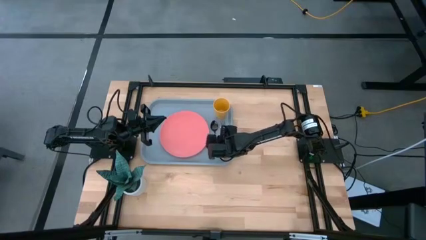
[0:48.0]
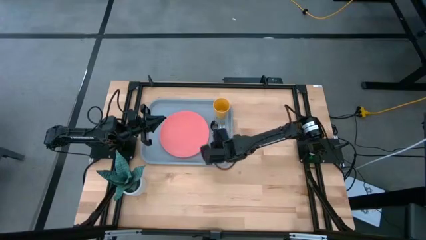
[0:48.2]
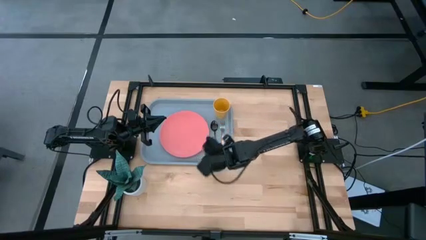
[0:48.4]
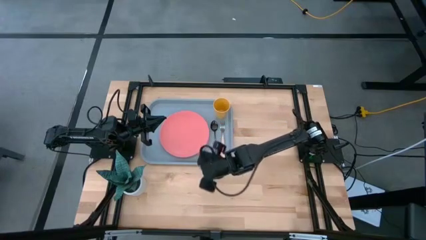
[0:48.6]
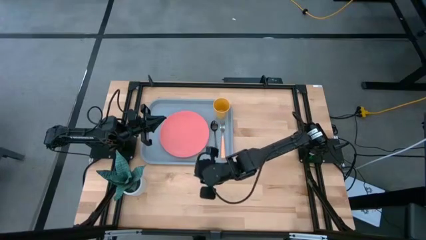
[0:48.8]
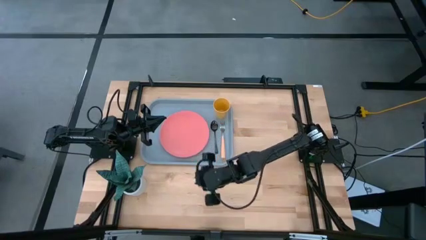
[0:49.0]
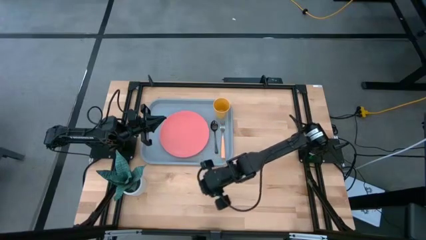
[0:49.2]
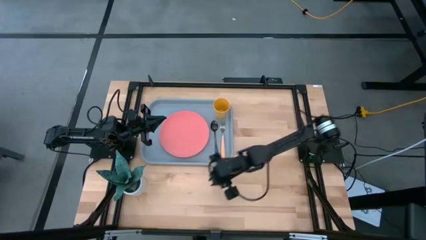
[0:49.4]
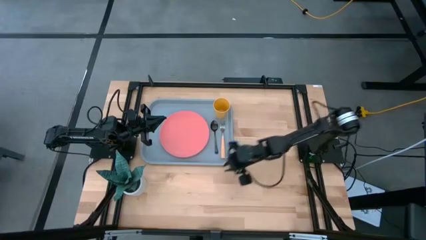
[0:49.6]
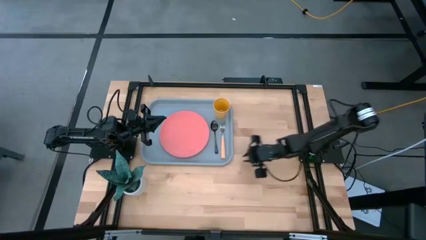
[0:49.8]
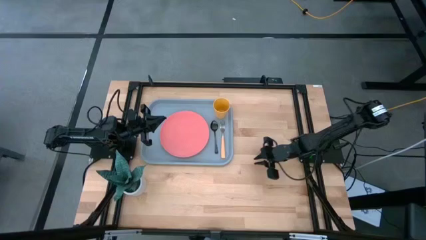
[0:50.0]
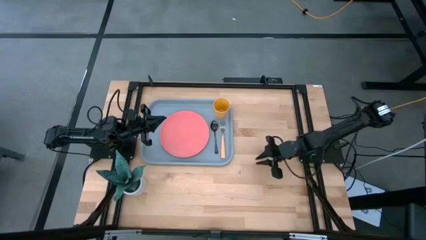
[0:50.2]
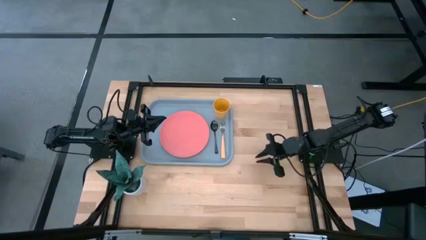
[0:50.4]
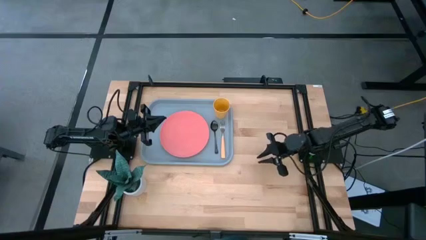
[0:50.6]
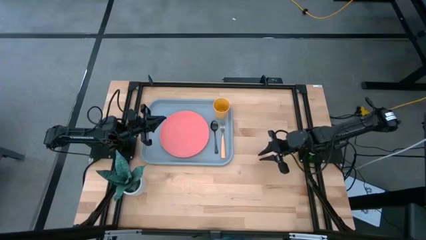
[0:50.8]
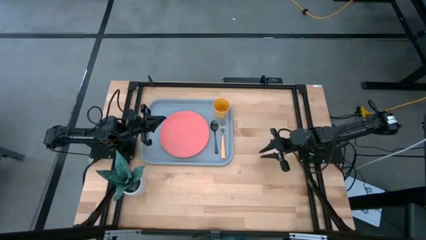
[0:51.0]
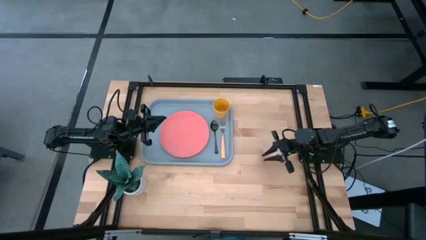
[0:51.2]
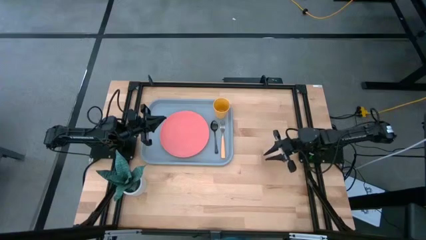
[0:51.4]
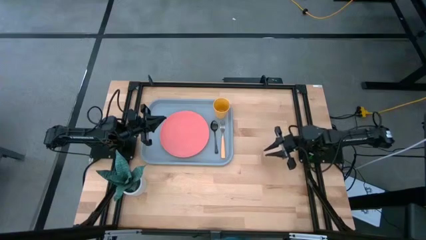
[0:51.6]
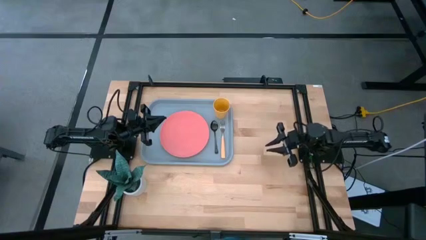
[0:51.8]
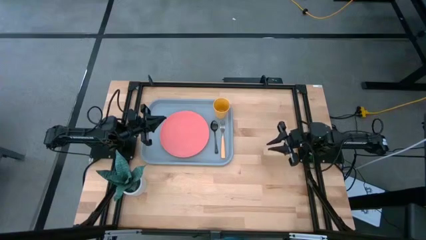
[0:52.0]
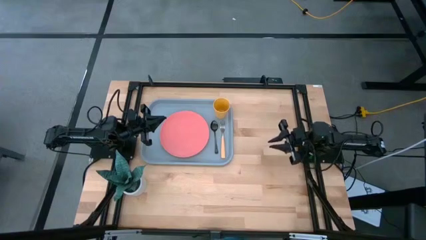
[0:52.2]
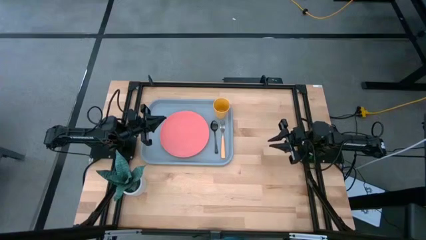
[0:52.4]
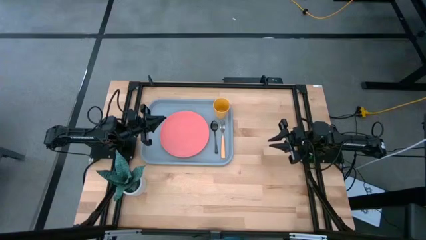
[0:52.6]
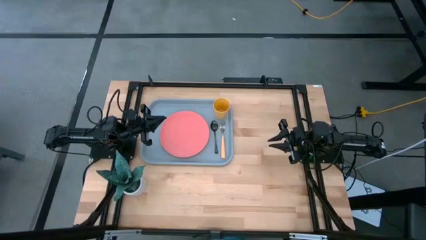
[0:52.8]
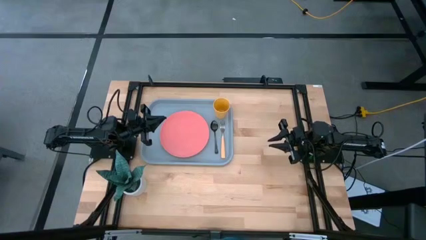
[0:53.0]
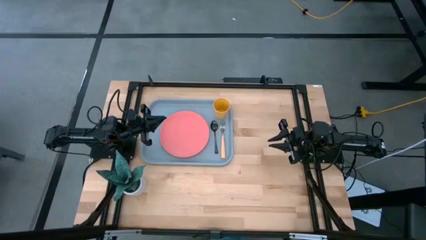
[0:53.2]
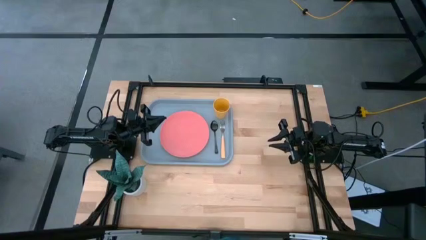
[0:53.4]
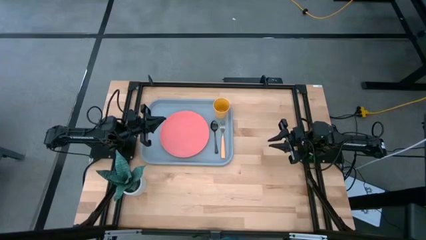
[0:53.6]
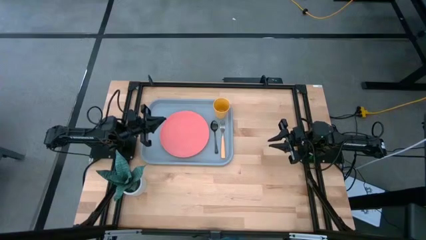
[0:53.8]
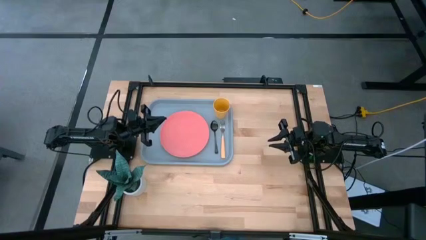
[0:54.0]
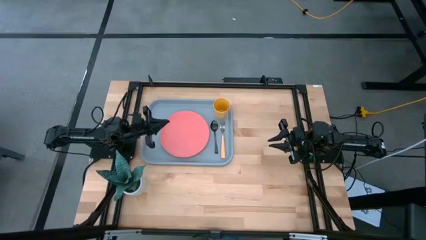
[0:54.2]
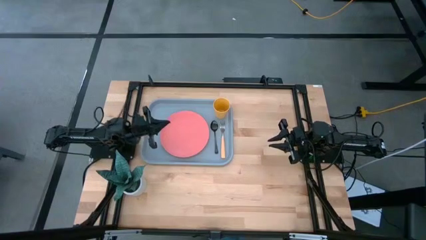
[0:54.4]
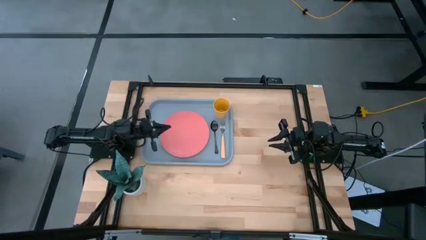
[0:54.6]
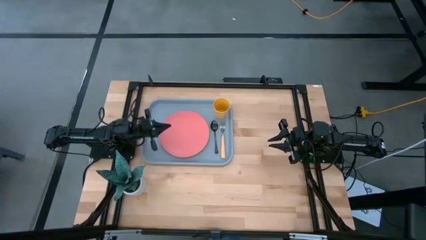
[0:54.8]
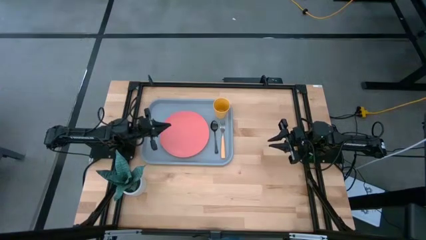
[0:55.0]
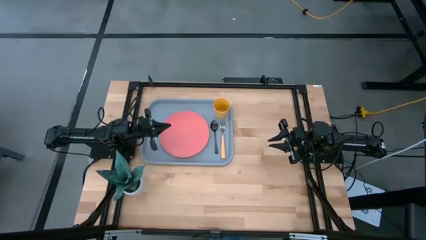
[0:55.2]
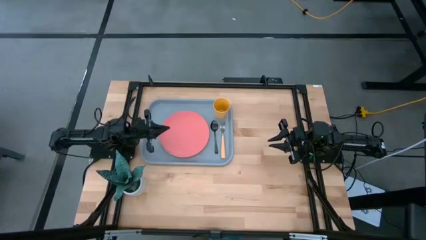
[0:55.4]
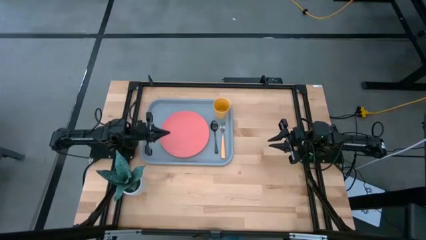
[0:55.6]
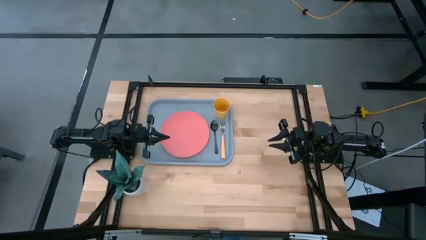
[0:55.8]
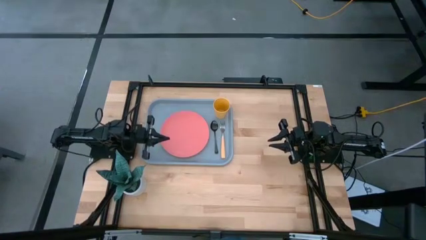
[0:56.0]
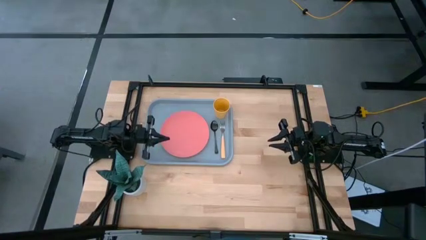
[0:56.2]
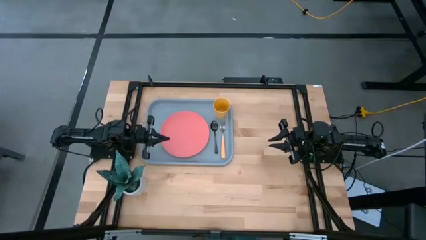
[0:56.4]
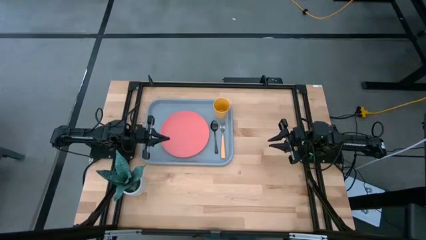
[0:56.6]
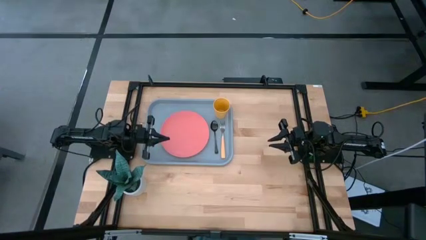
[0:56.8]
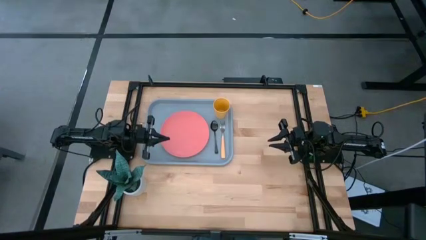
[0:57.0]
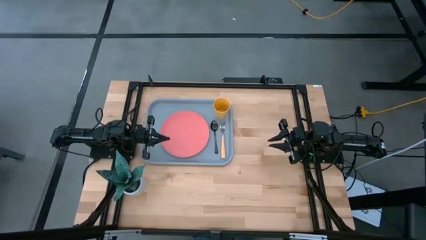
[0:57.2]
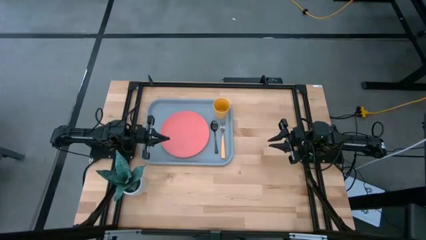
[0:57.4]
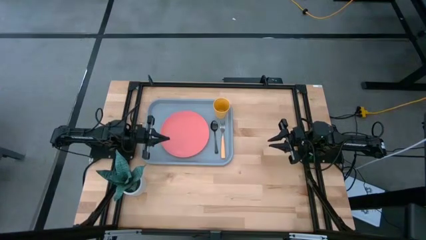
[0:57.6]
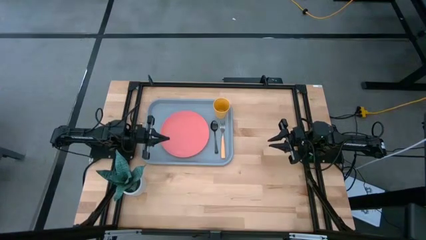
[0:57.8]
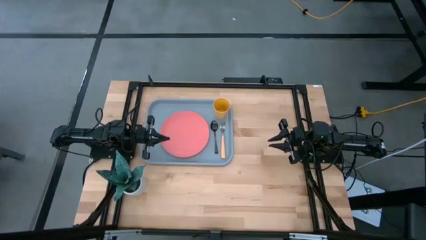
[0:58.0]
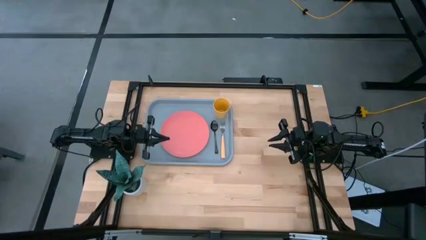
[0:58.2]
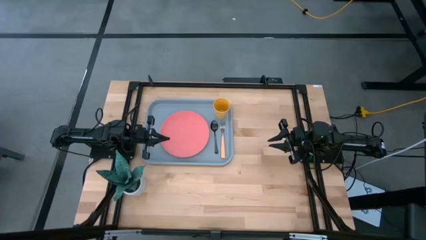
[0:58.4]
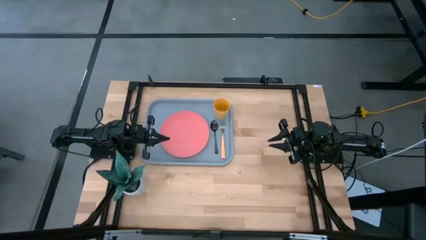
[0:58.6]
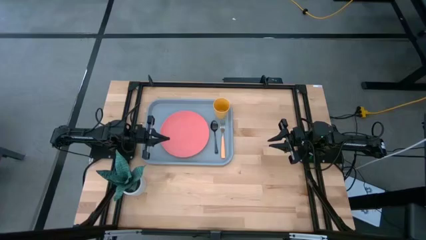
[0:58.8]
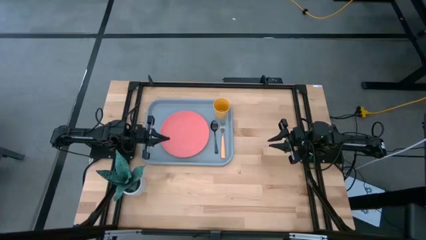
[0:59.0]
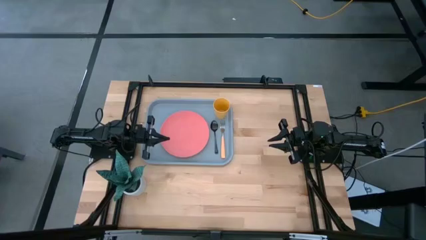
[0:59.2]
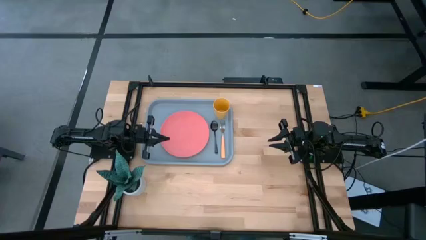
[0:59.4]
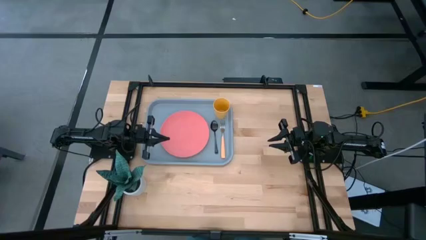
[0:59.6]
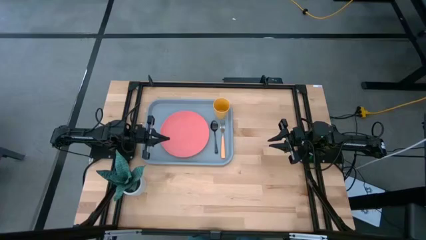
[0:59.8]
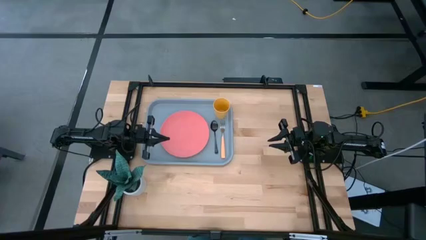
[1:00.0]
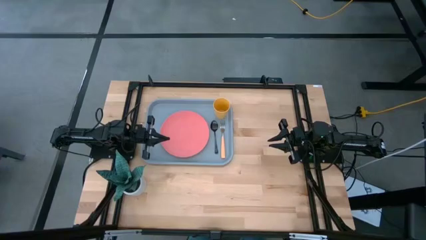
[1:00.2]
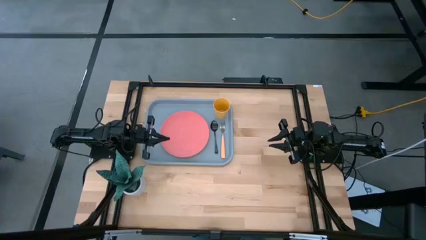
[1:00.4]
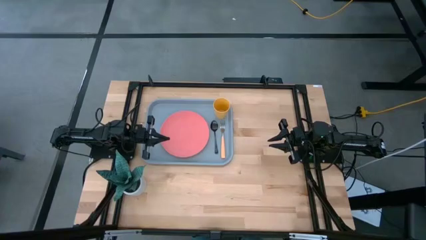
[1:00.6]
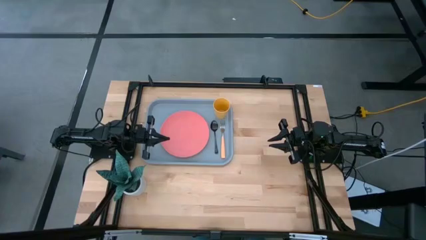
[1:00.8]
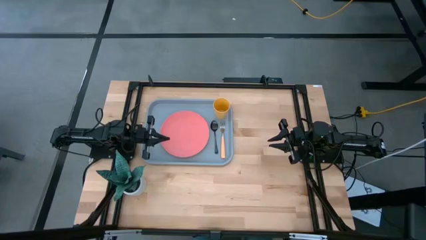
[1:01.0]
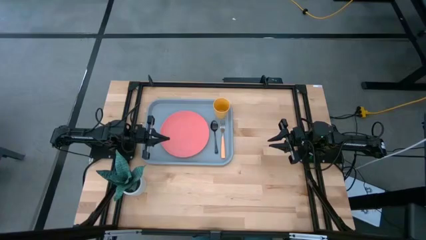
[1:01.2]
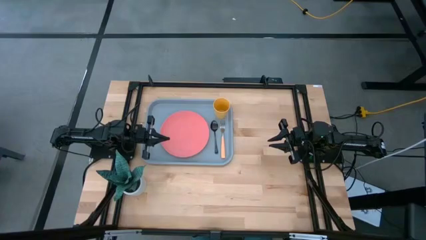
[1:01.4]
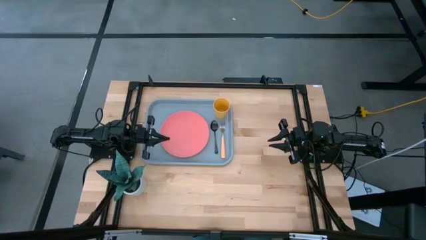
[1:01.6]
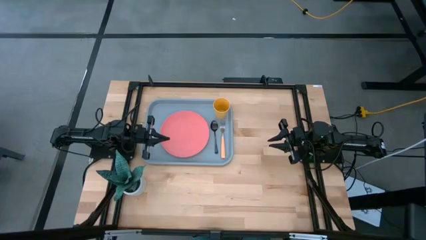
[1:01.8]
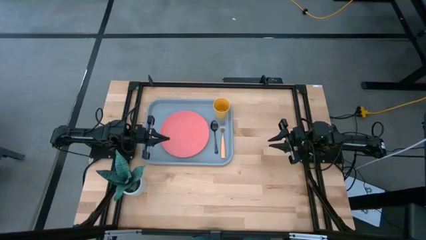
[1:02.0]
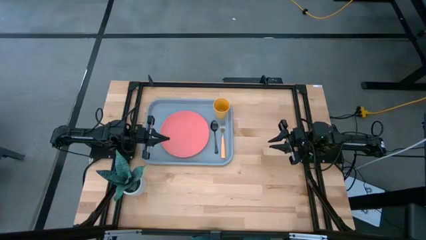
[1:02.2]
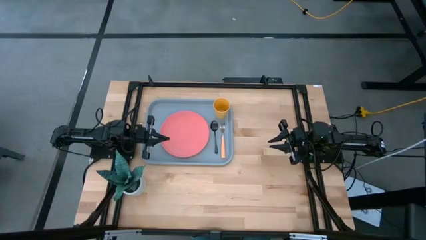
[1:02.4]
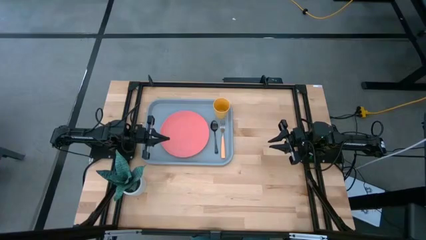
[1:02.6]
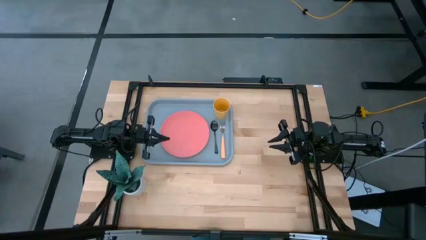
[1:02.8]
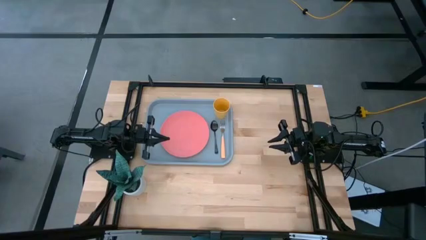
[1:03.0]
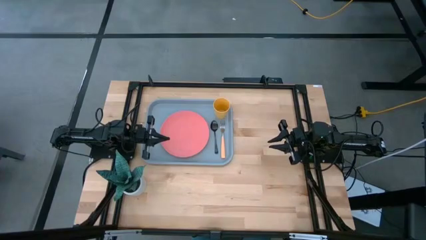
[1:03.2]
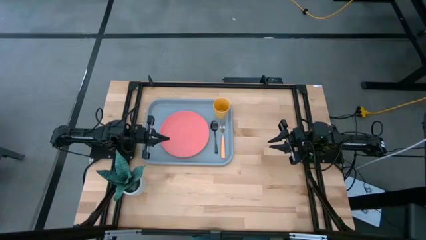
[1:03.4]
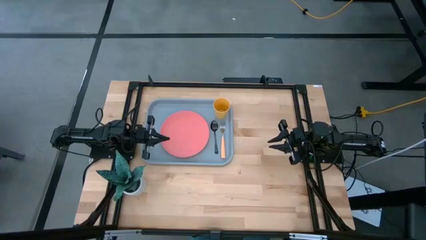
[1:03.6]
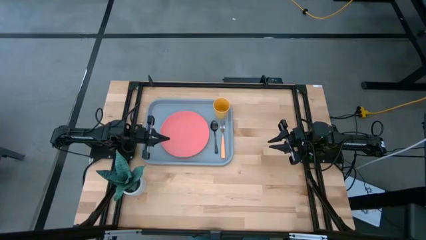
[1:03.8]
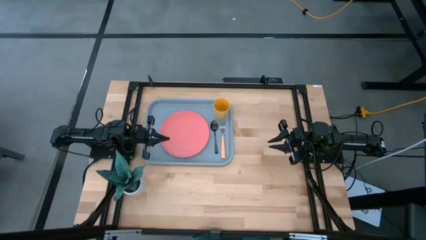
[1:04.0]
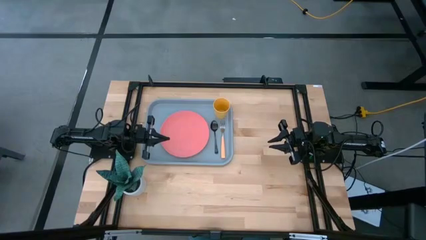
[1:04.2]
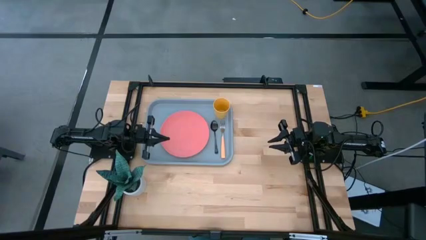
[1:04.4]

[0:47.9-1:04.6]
Task: Pick and place plate/cup/fork/spoon on tray
Return to Home Position
